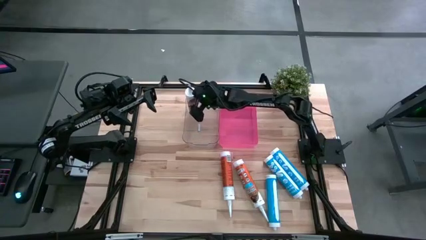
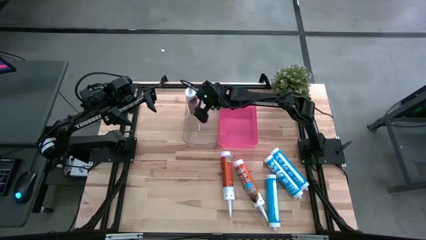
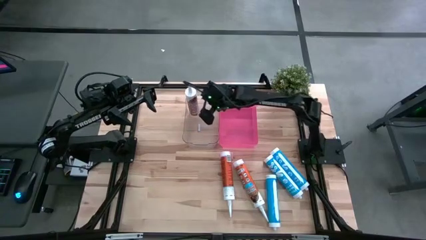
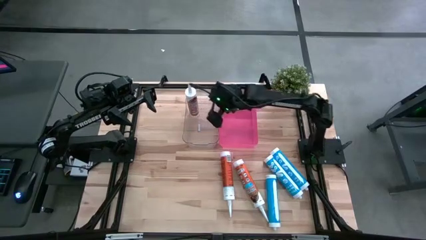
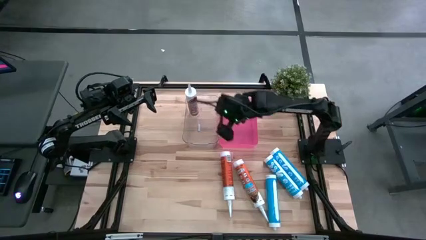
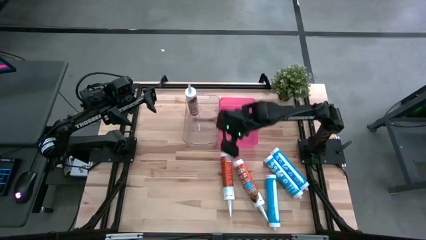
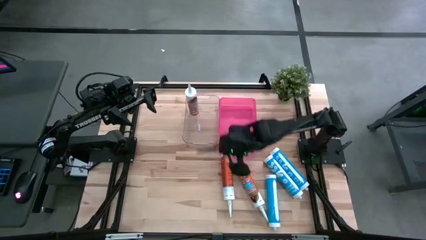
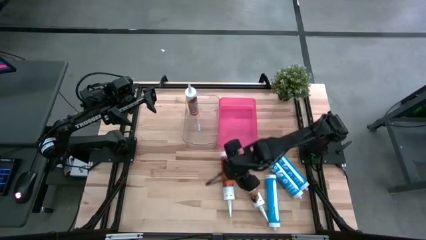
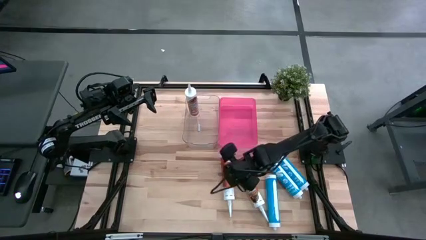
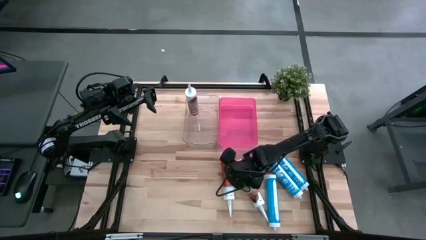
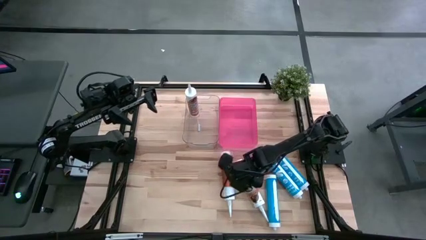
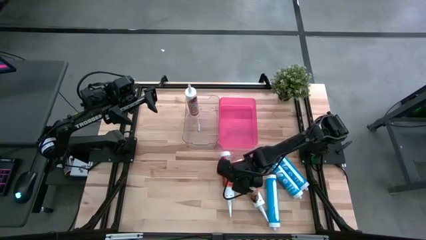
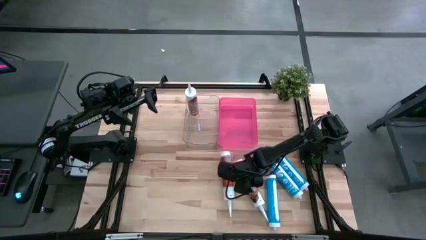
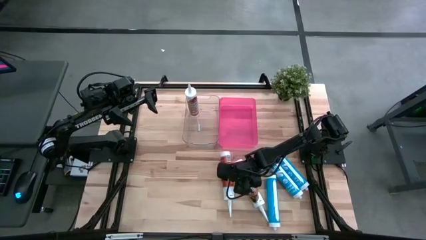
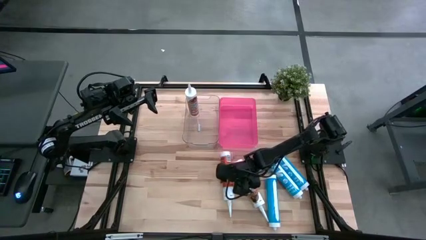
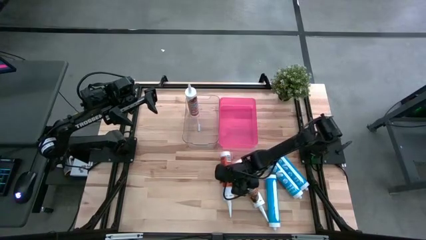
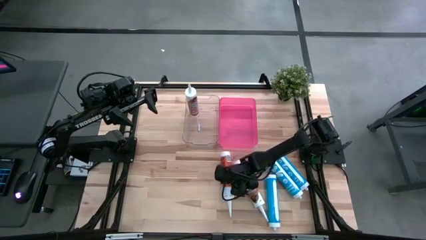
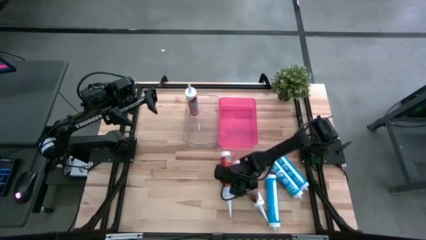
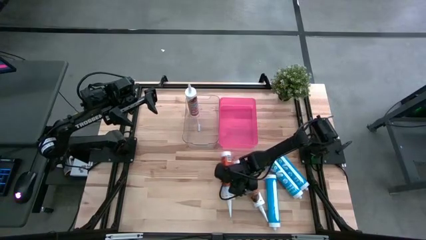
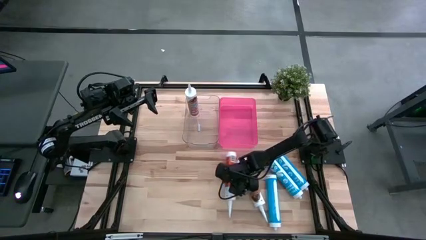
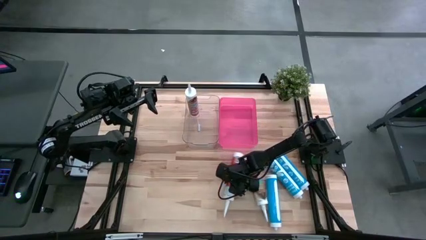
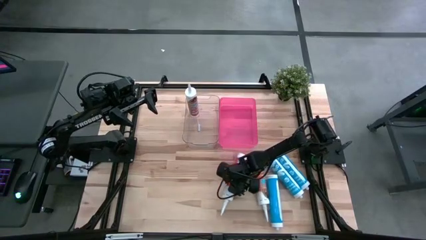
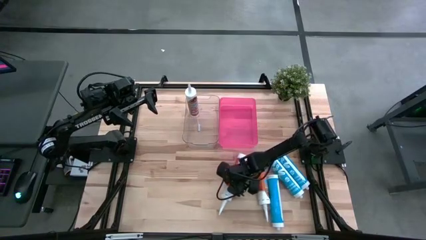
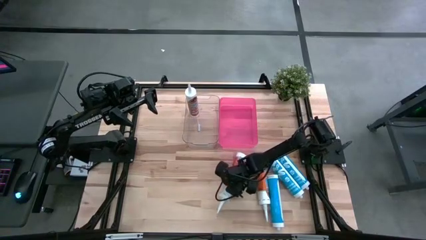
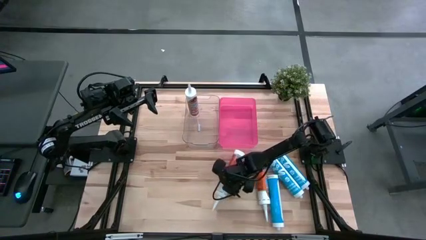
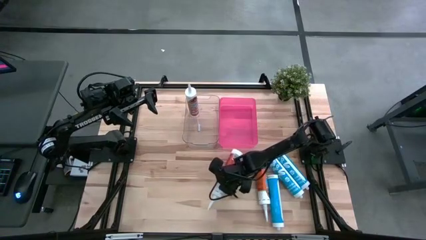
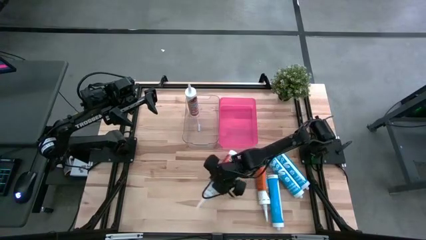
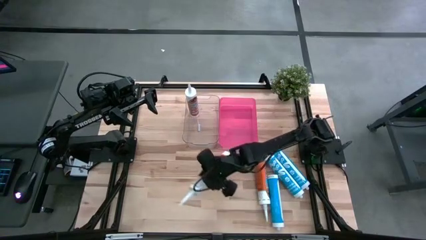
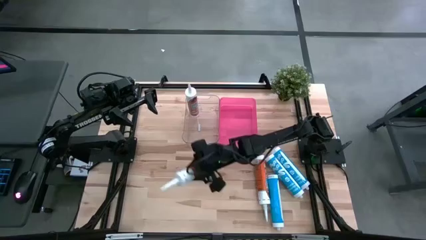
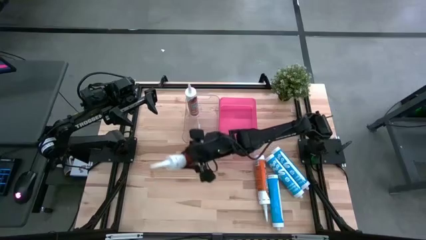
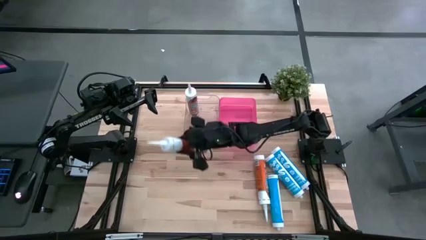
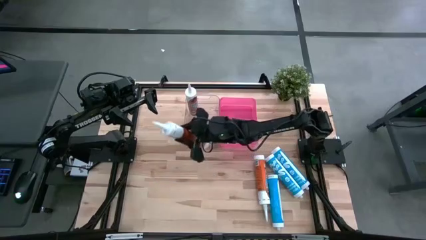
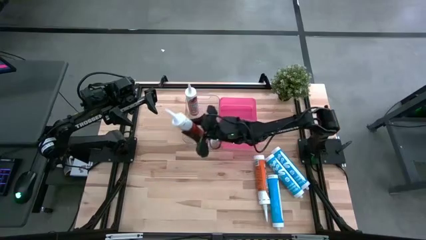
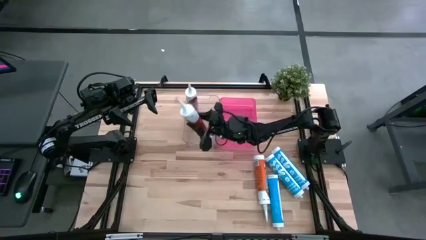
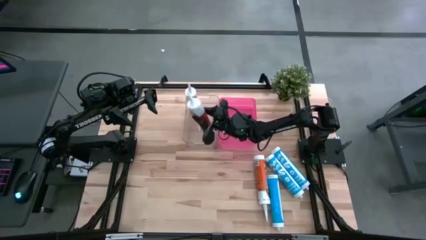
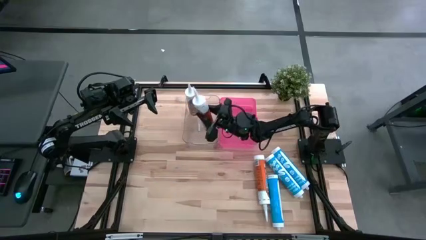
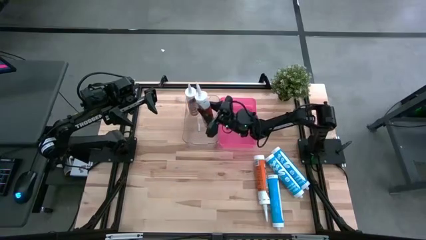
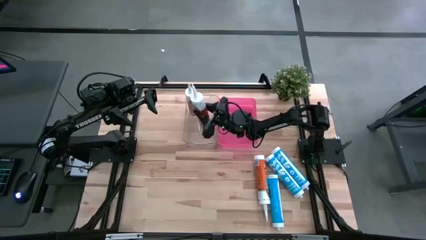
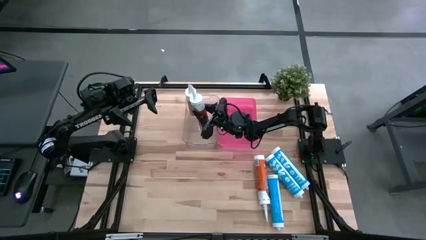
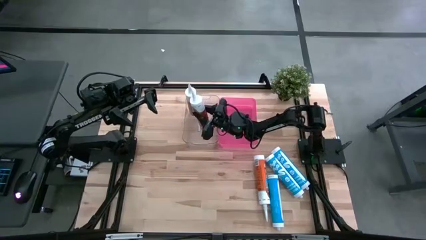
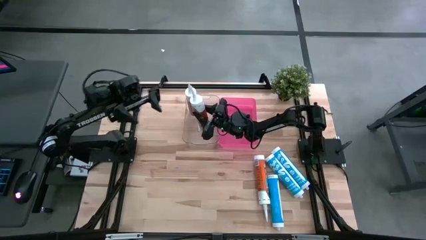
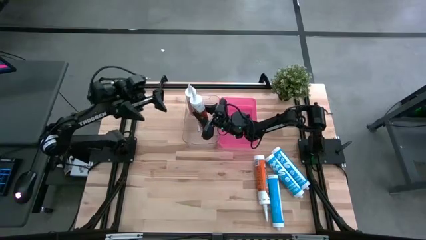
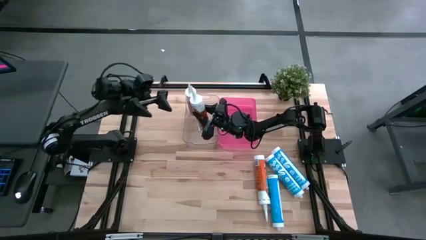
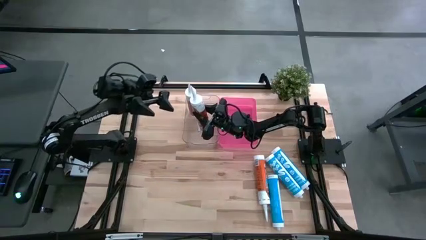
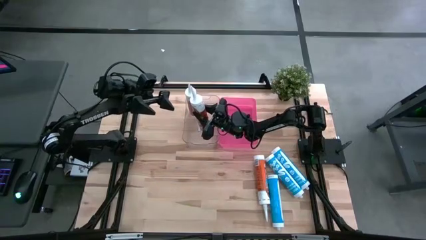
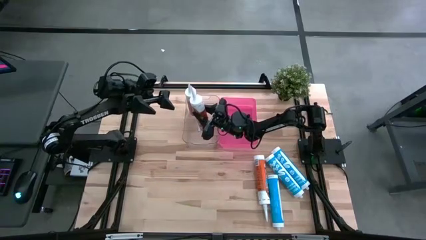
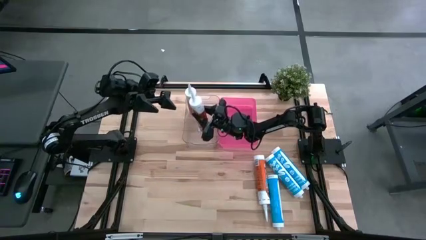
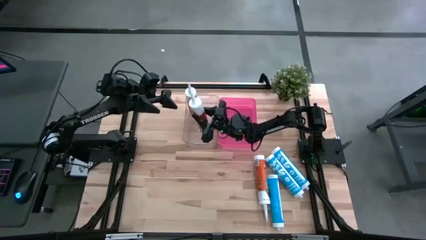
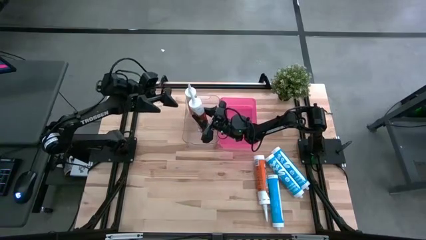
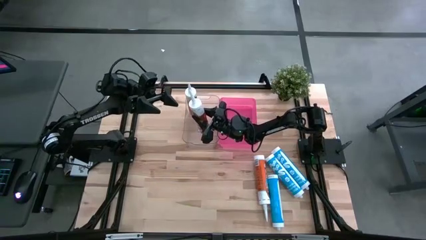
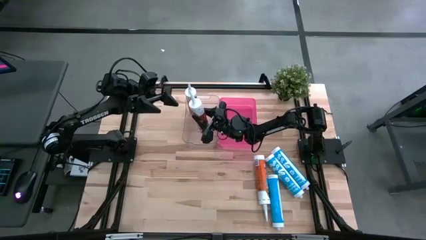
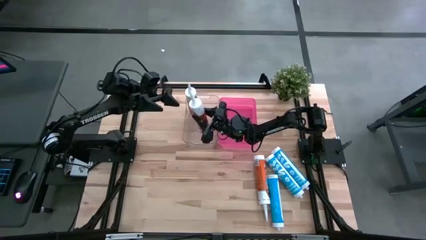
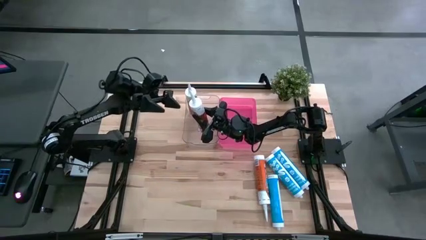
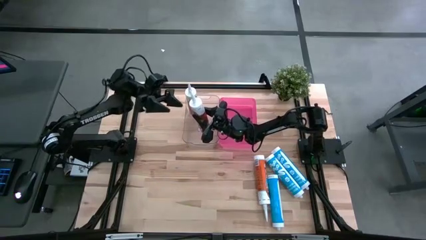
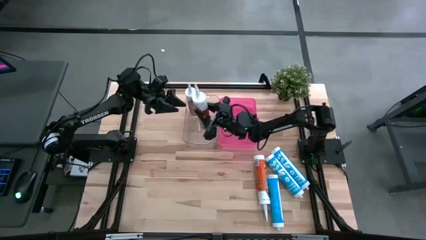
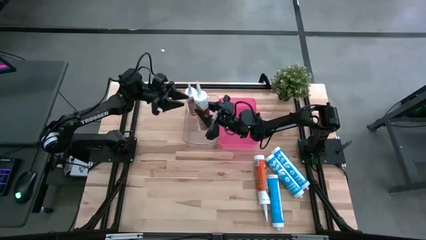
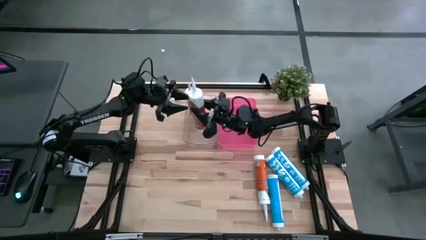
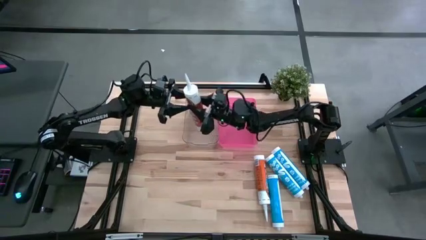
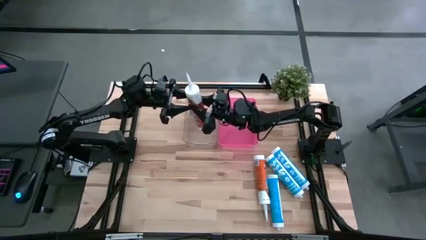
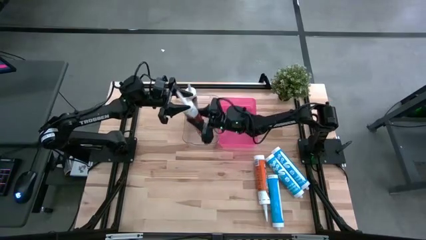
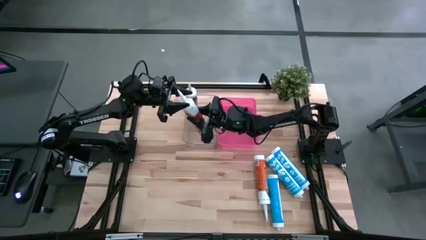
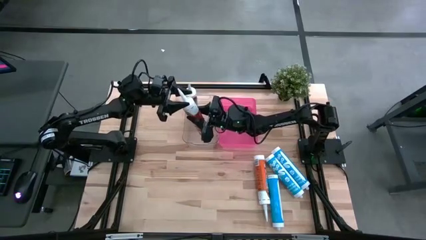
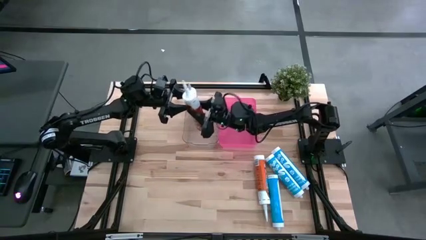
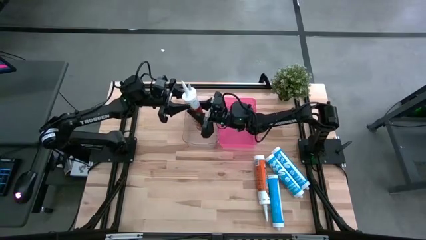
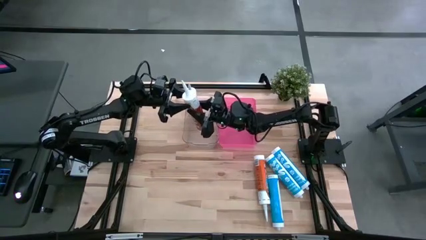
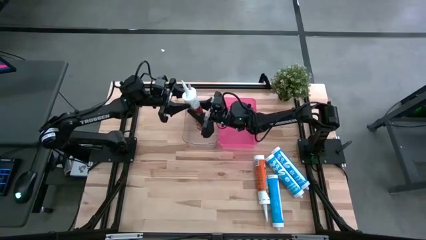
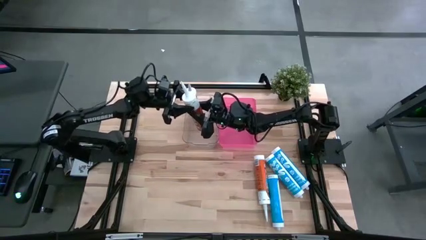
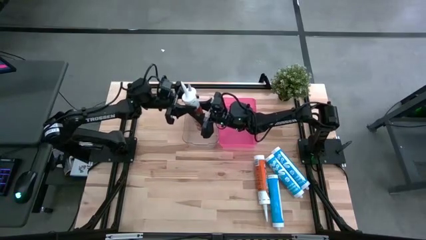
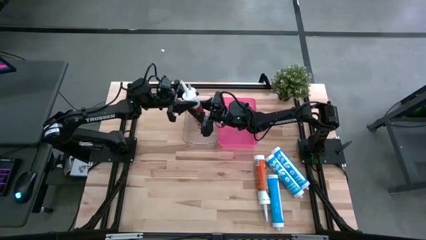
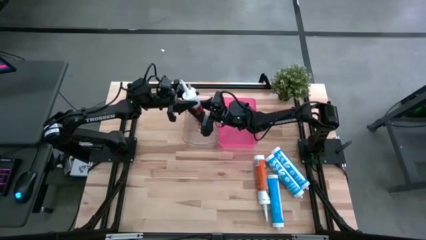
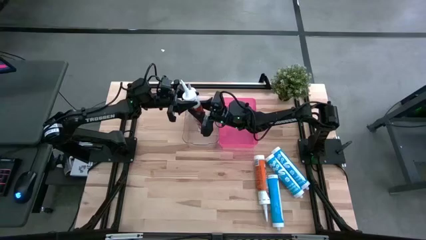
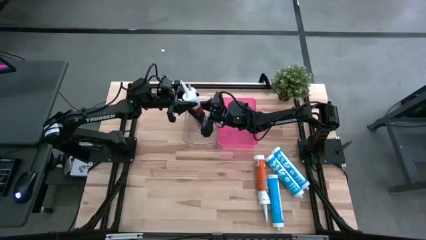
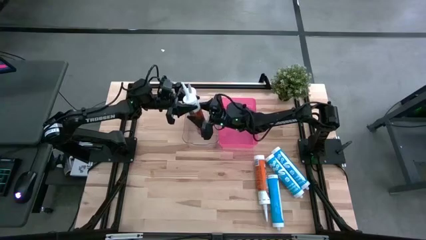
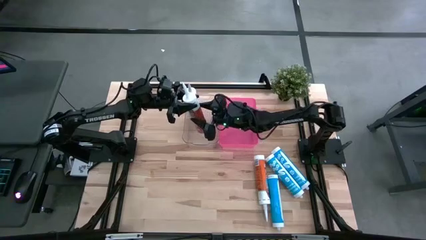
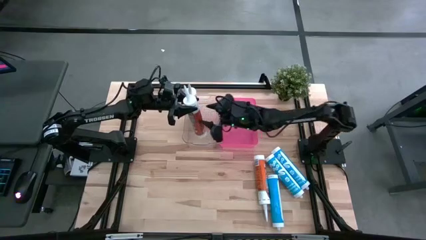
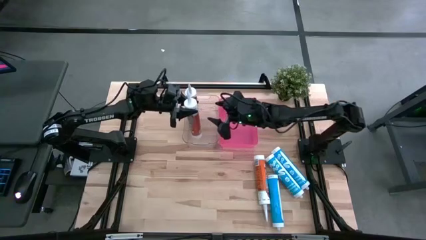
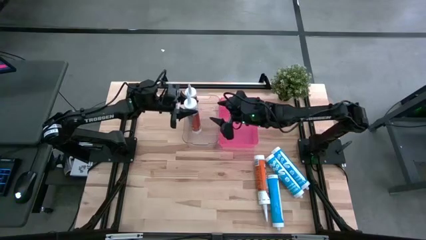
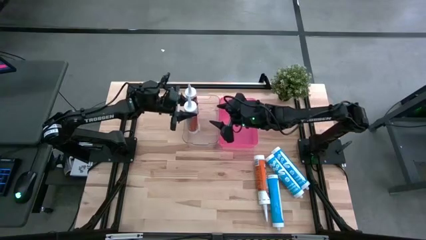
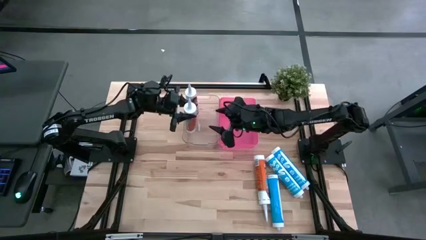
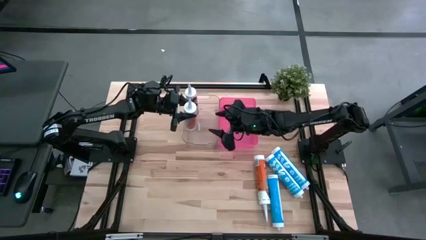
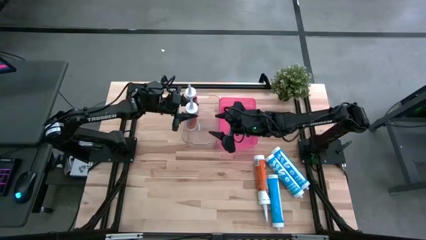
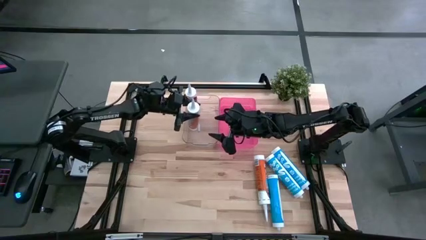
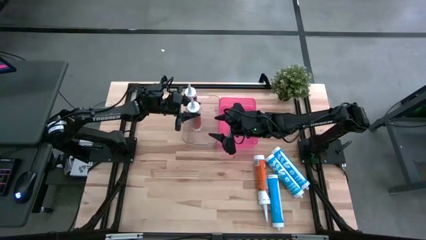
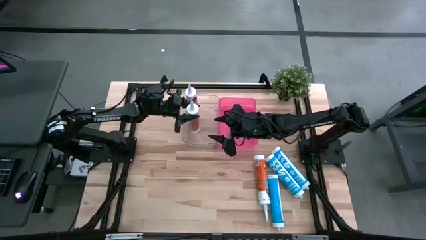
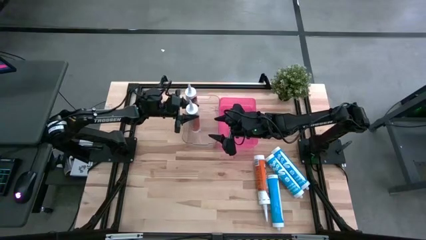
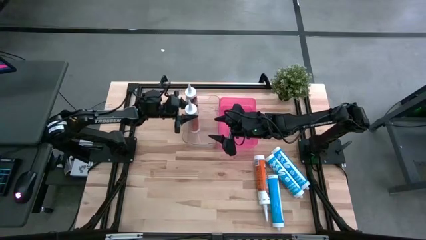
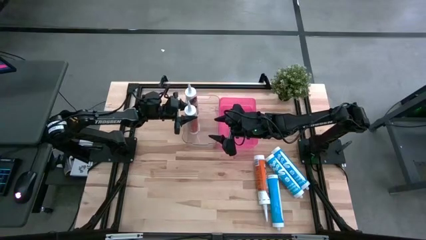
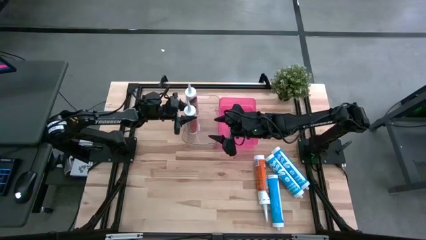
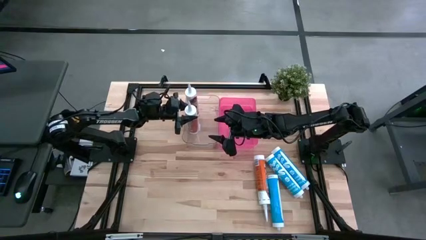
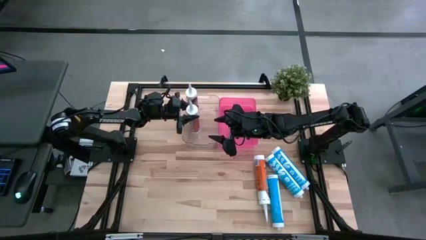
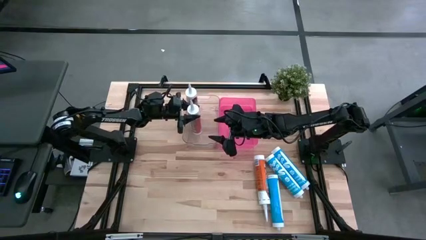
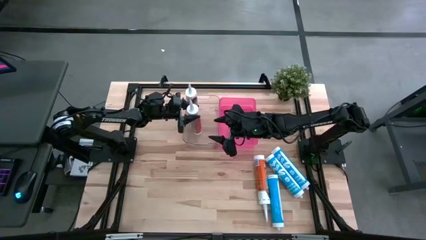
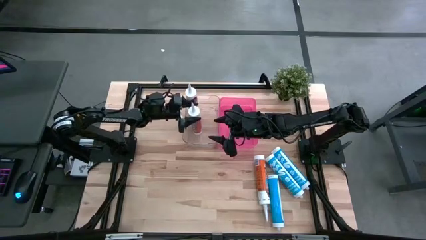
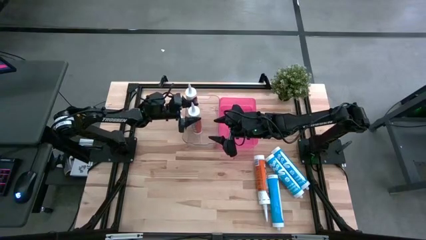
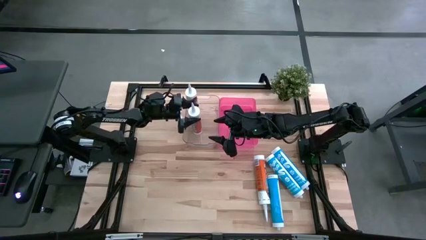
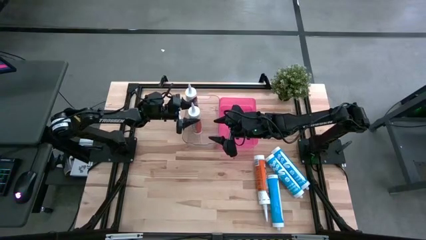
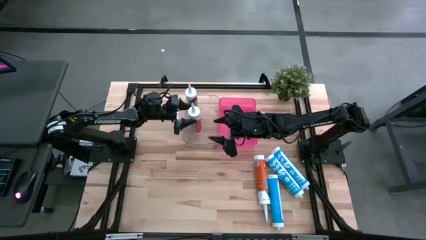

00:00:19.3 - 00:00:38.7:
Task: Pick & place silicon tubes, Sealant and Lysol wipes
Put the left orange sealant into the transparent bin
